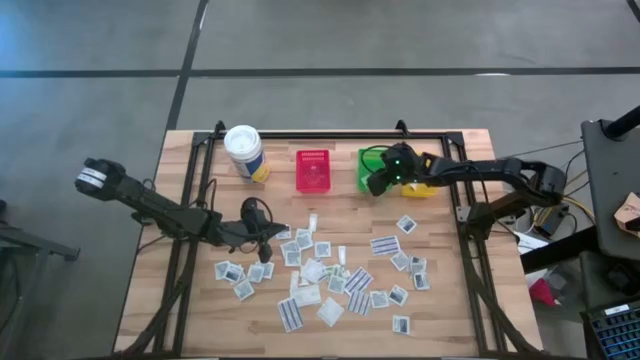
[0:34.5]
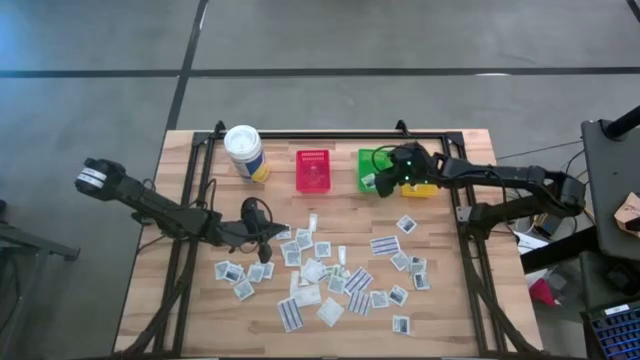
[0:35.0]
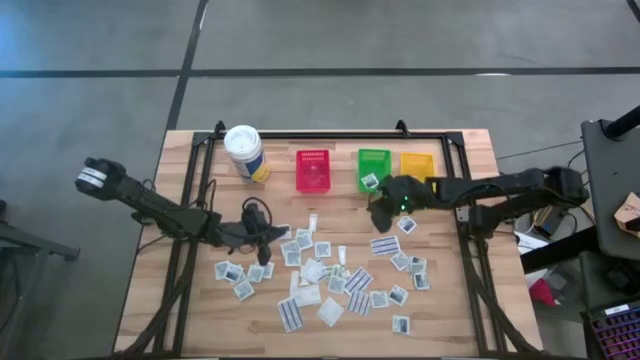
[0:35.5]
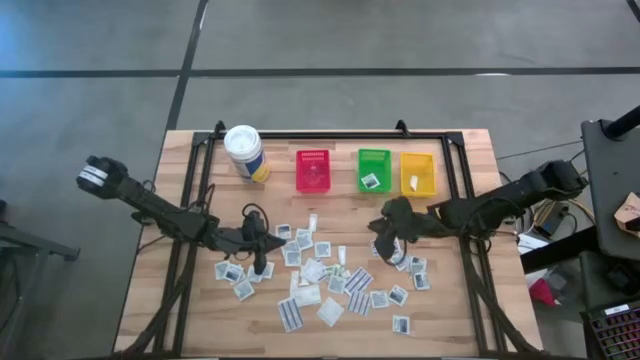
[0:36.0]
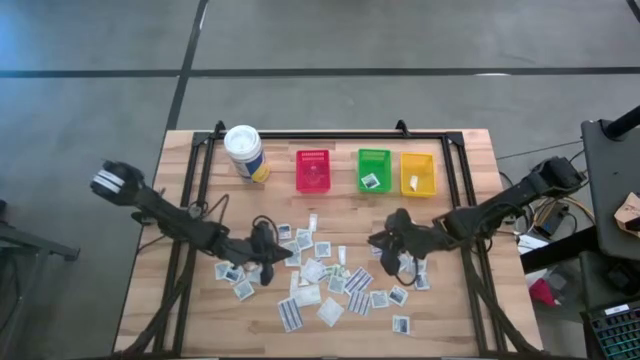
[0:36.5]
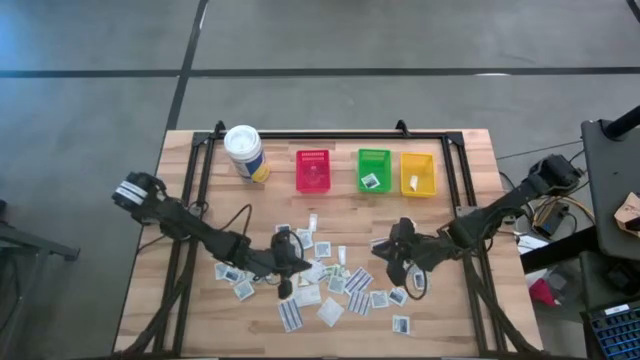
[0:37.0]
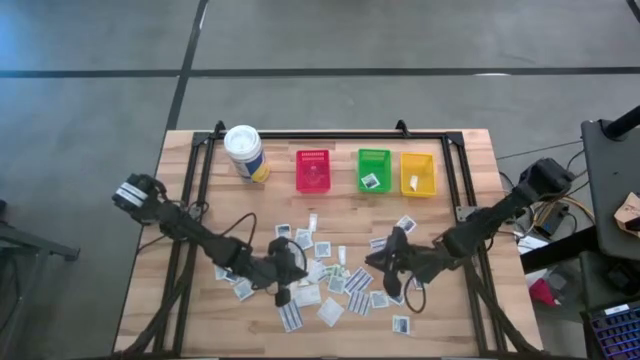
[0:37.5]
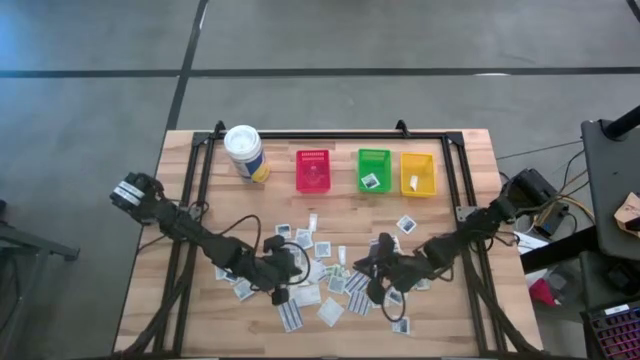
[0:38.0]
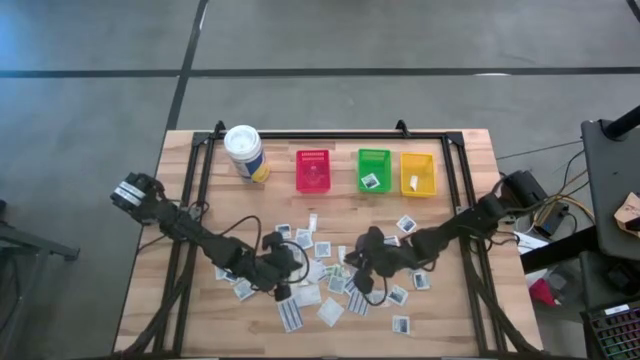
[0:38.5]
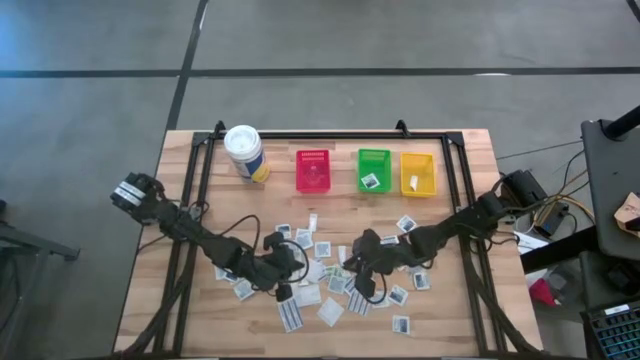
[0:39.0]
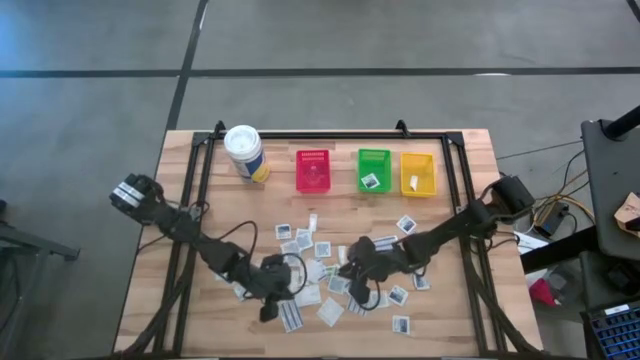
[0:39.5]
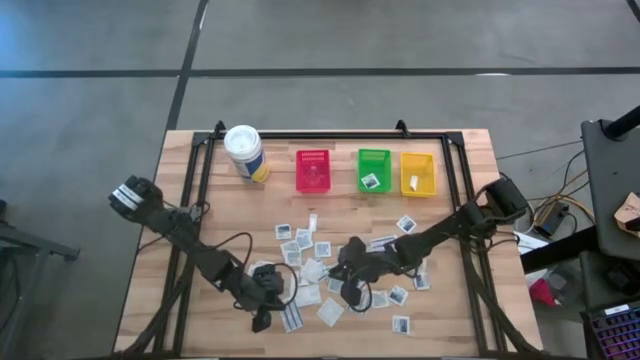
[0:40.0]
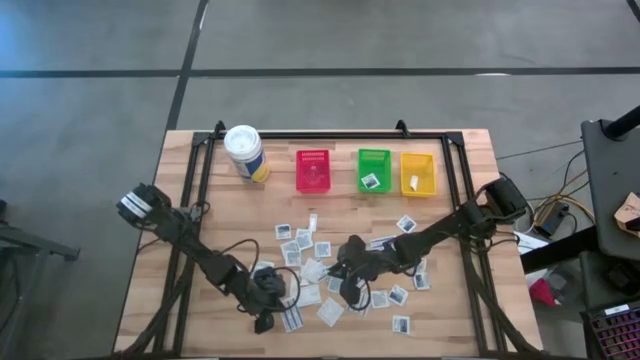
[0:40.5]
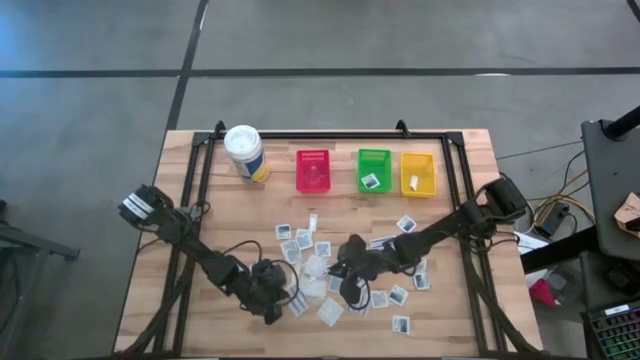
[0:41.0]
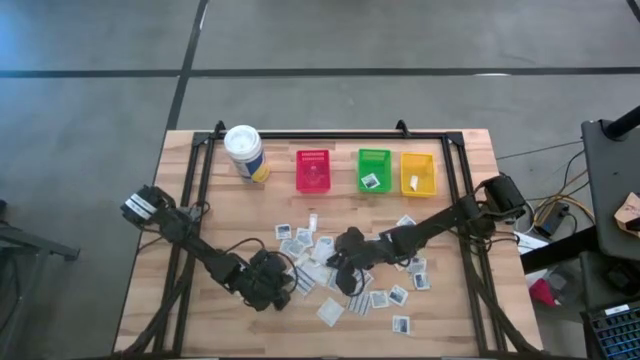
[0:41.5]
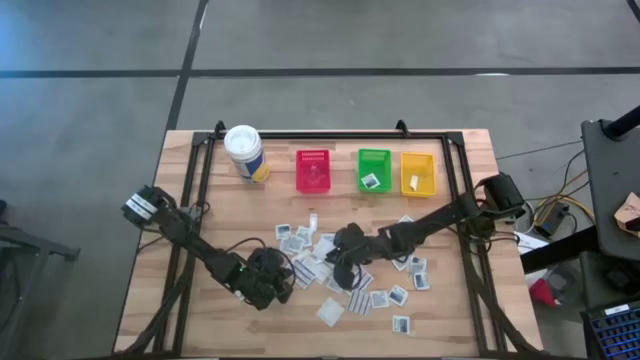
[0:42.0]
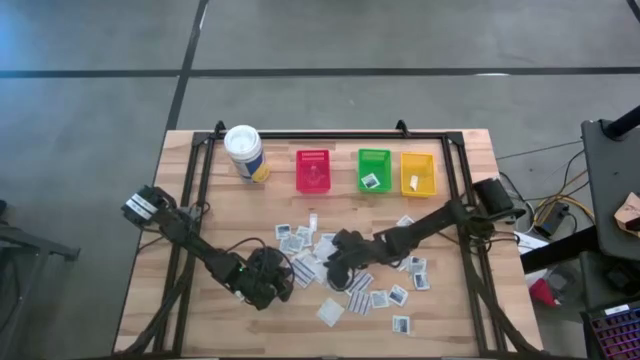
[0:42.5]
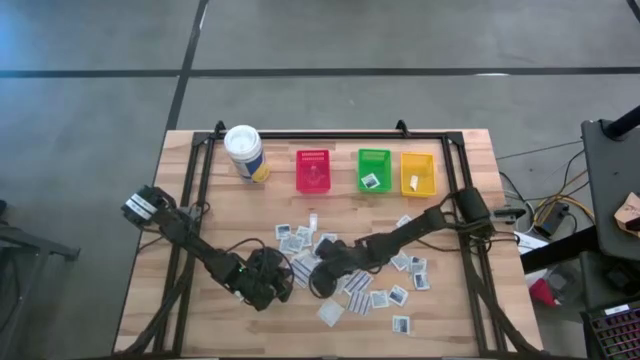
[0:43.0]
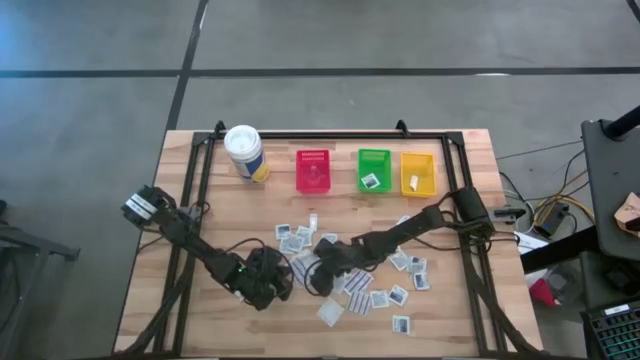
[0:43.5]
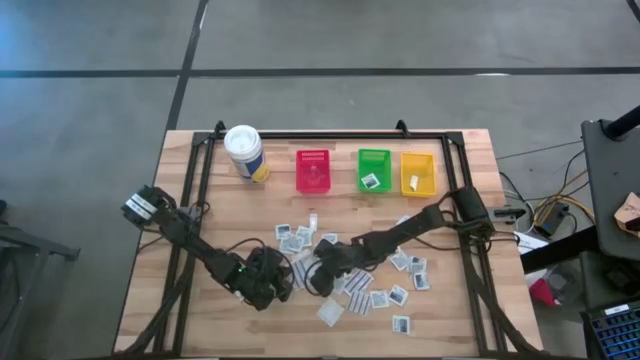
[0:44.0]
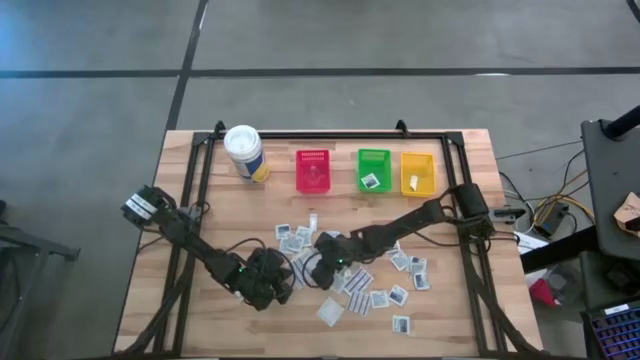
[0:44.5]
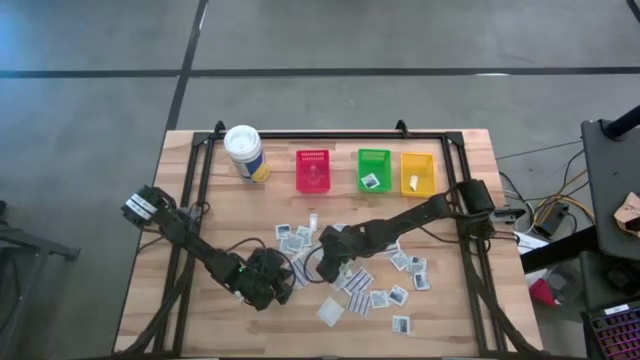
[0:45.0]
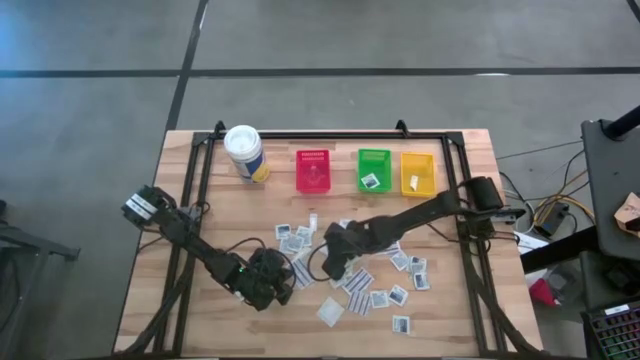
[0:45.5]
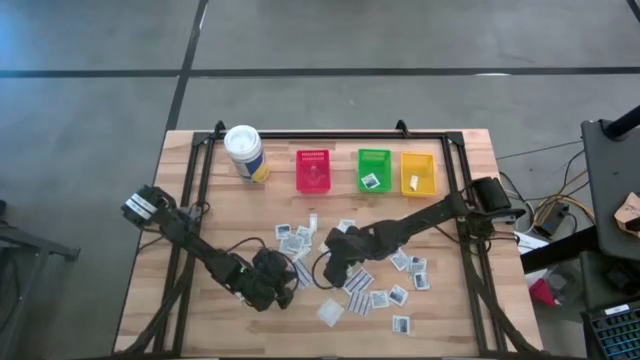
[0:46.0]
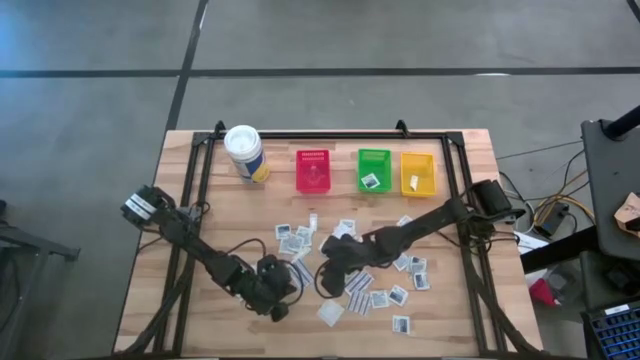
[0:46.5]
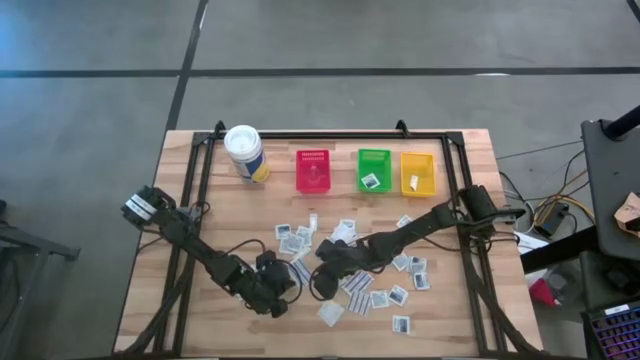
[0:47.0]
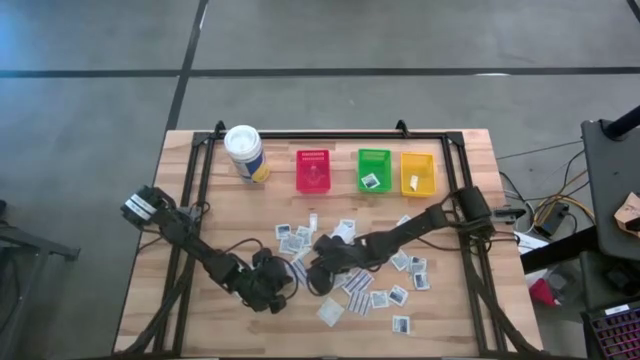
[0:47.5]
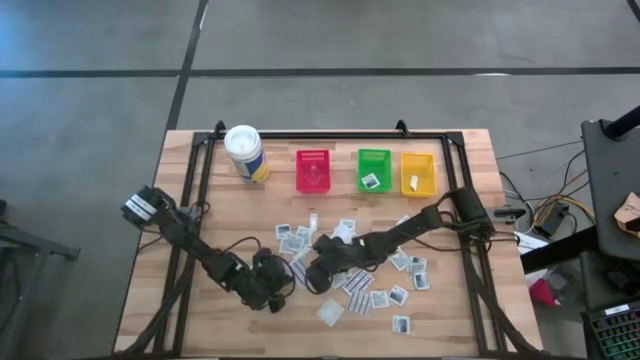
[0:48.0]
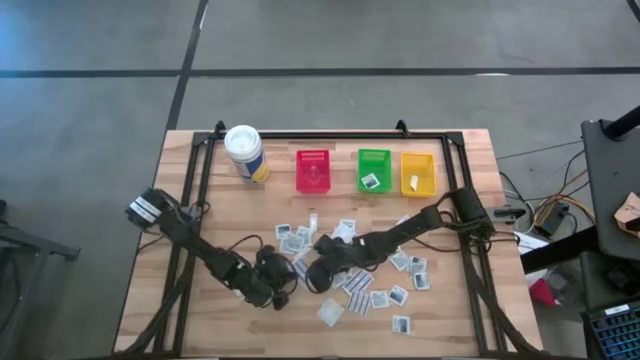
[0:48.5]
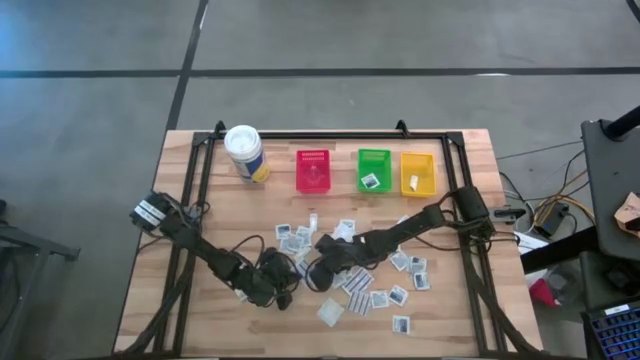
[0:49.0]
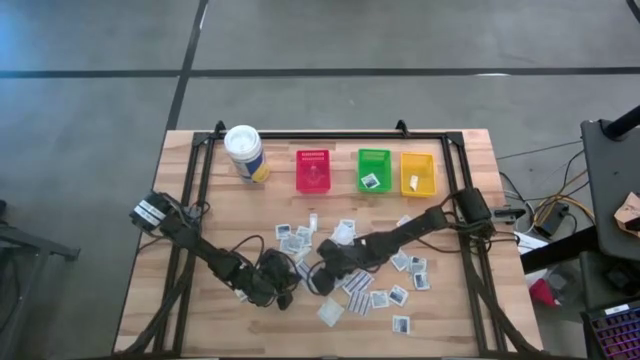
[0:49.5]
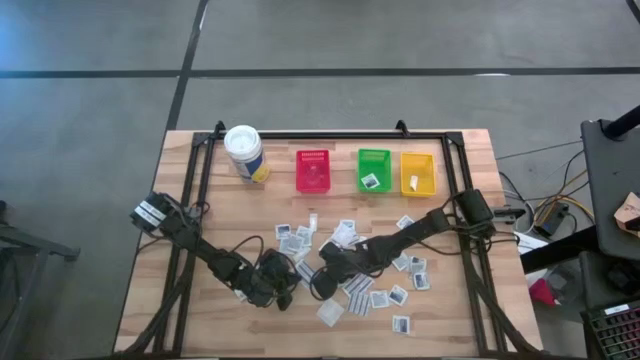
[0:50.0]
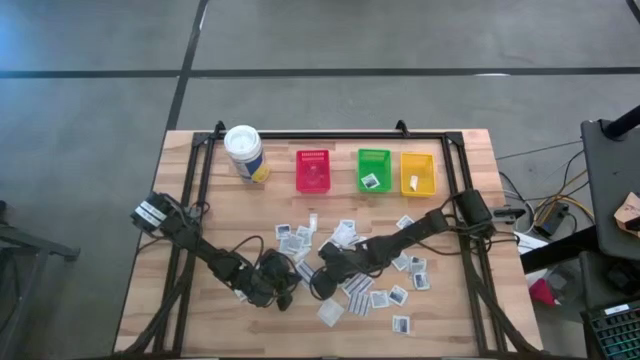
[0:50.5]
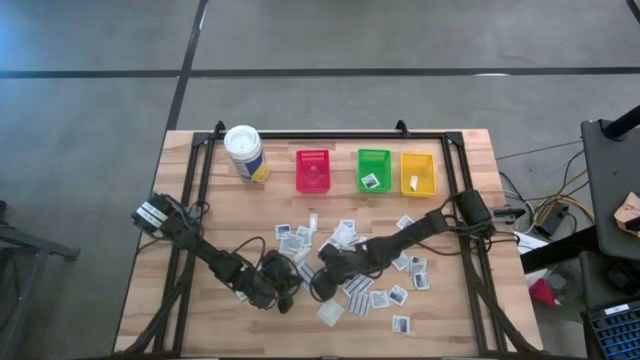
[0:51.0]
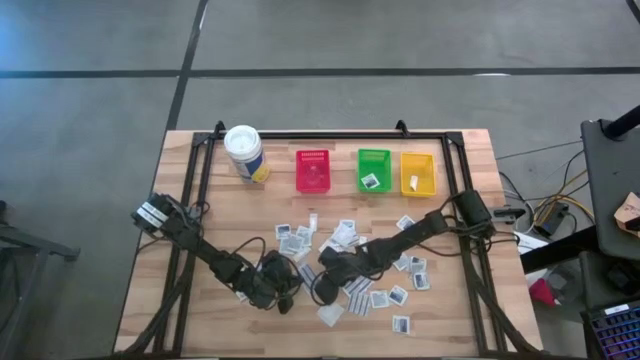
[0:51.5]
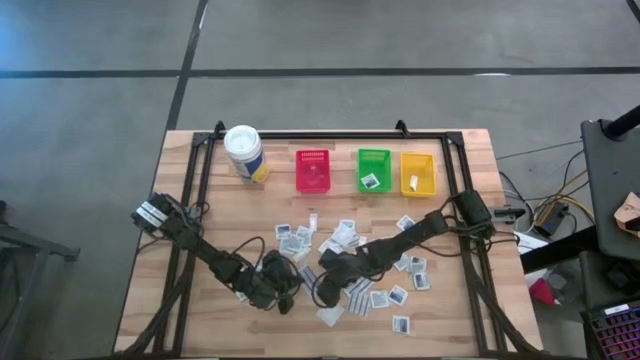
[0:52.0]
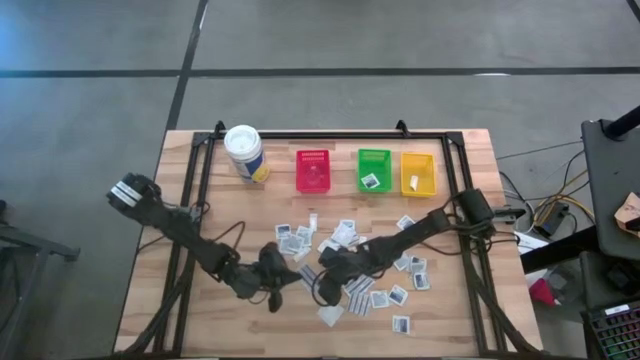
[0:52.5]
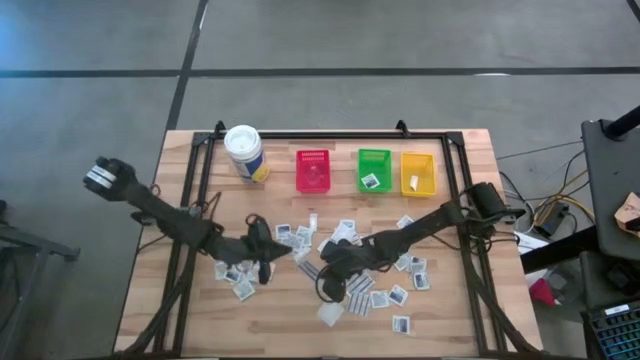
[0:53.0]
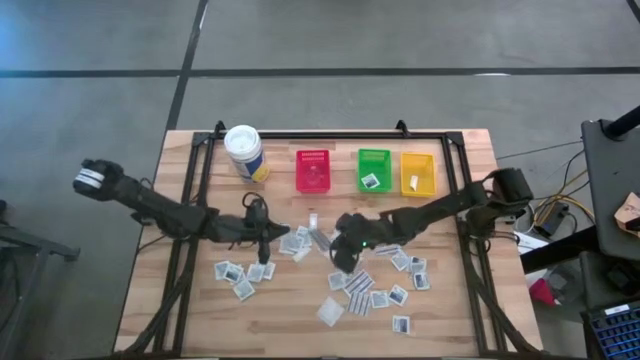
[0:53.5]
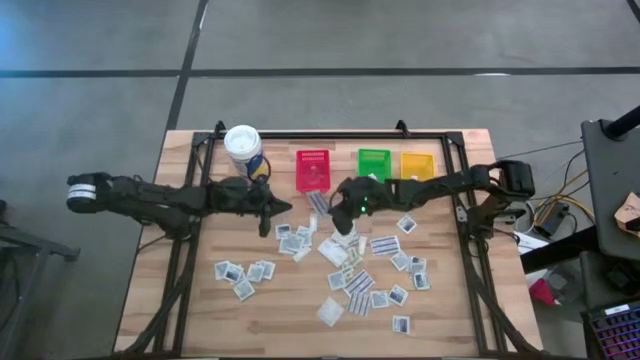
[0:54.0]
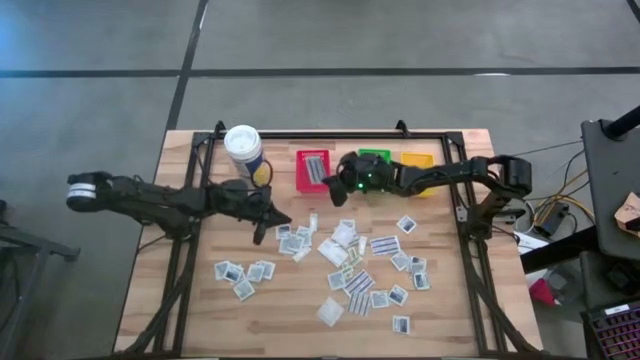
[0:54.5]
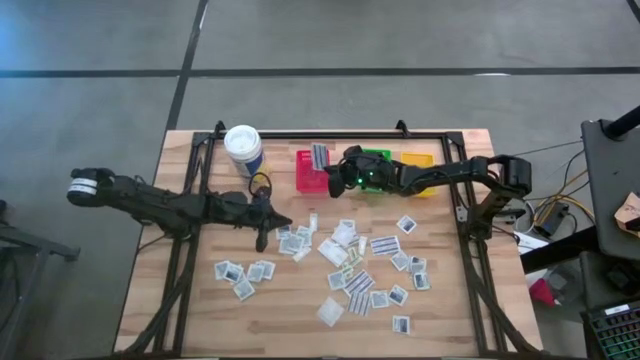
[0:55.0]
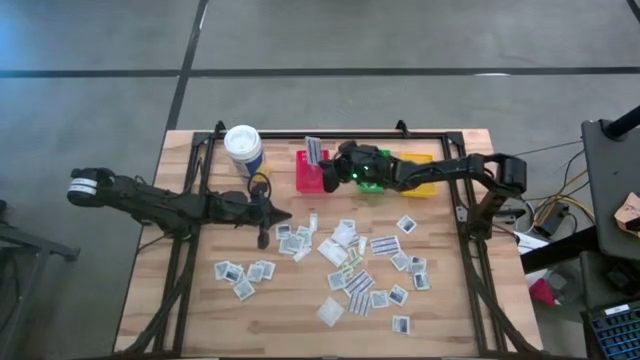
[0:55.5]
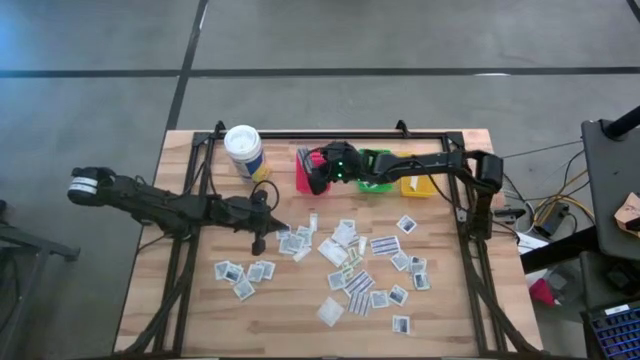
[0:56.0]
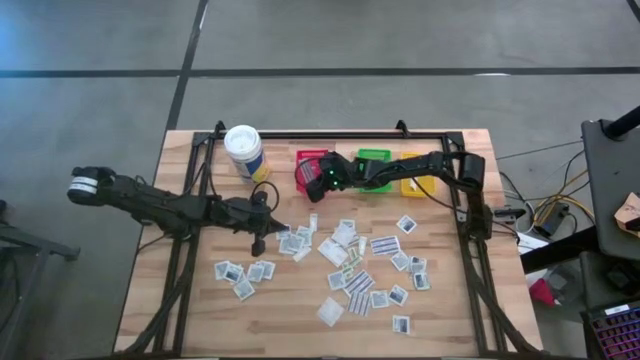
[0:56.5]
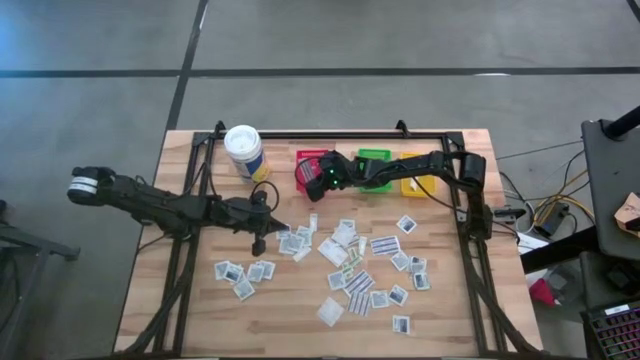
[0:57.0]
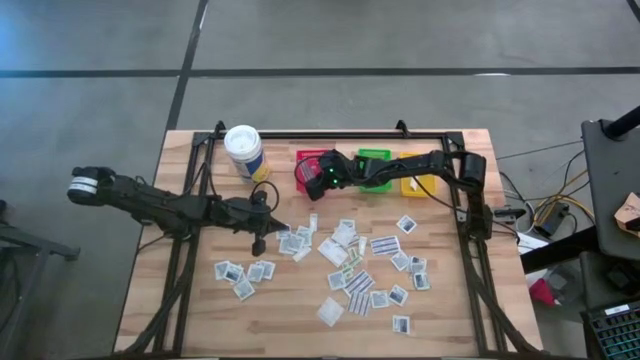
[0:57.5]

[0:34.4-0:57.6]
Task: Pick & Place First Aid Supplies
Put the blue bandage in the red bin
